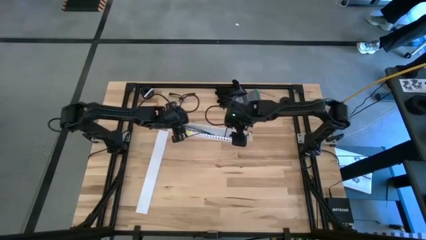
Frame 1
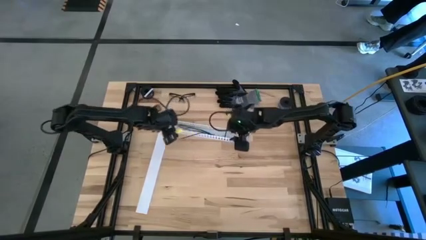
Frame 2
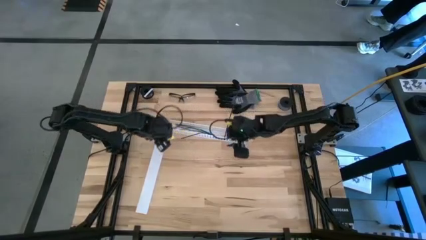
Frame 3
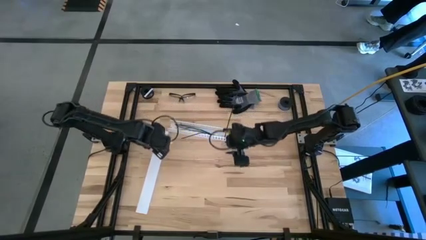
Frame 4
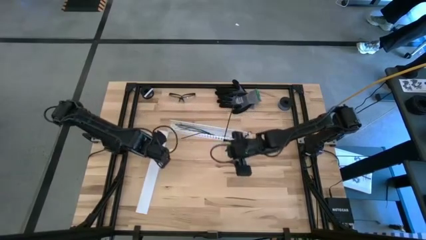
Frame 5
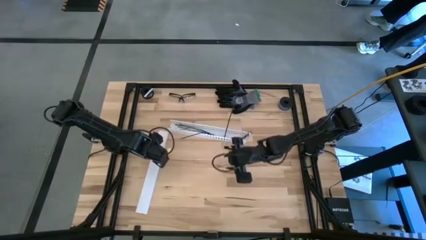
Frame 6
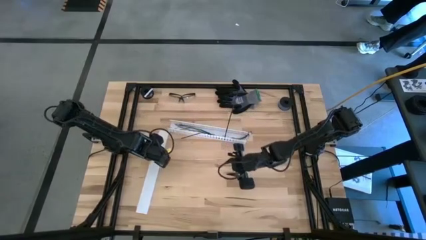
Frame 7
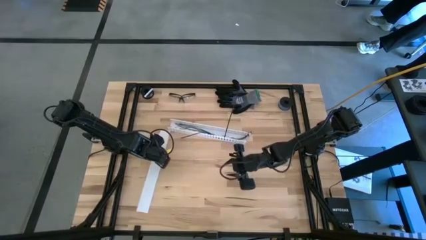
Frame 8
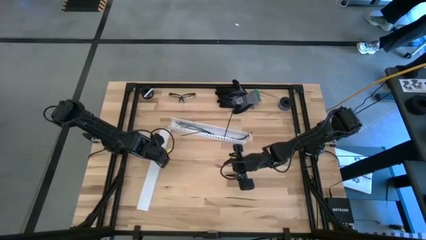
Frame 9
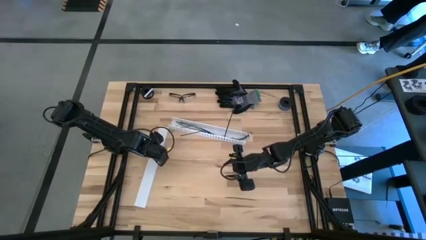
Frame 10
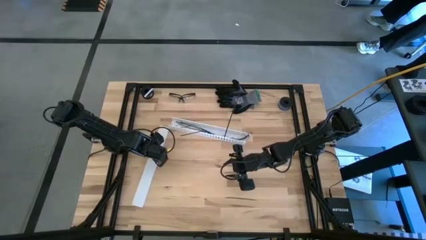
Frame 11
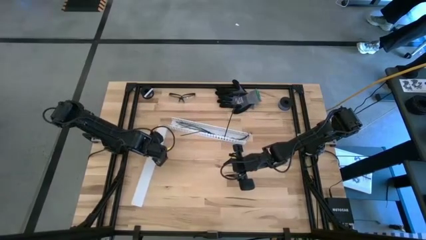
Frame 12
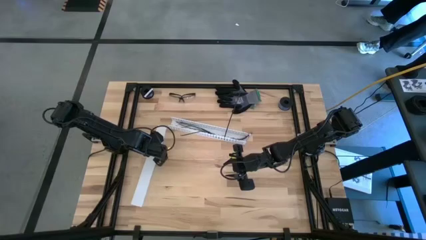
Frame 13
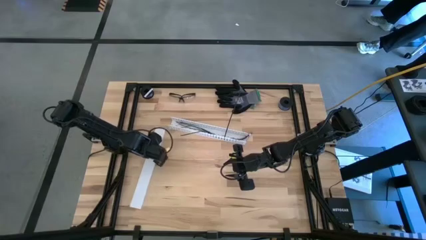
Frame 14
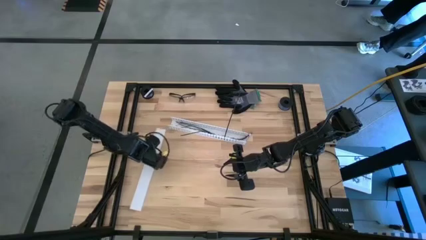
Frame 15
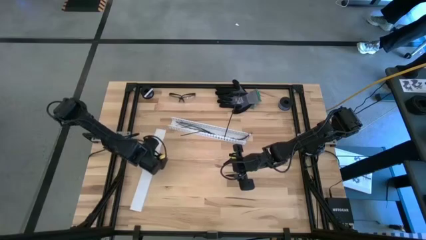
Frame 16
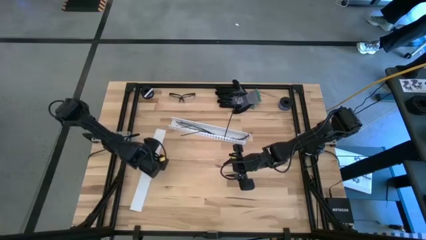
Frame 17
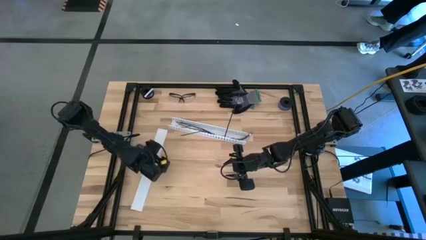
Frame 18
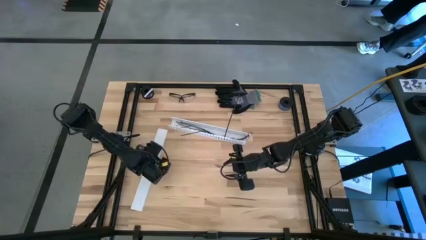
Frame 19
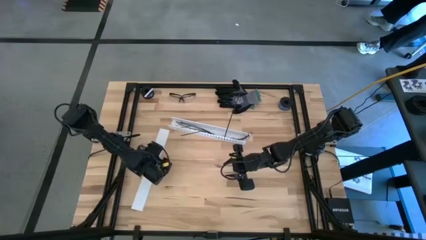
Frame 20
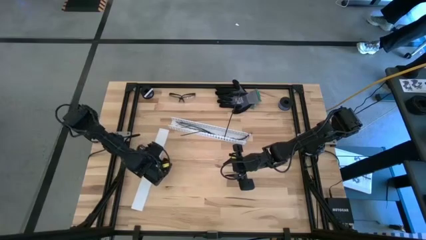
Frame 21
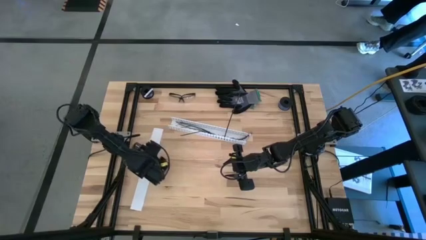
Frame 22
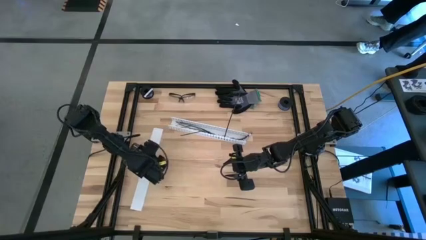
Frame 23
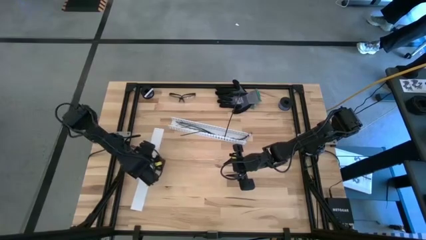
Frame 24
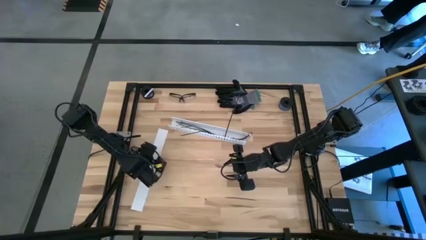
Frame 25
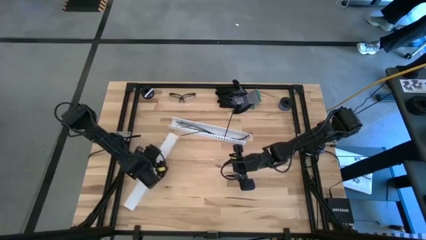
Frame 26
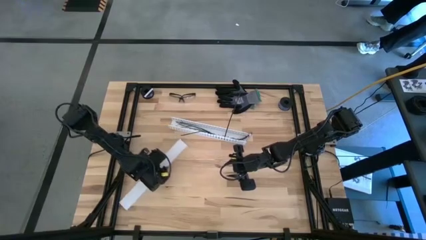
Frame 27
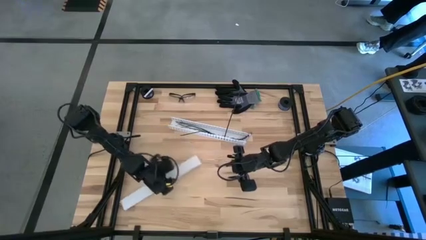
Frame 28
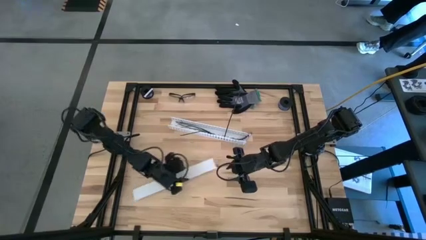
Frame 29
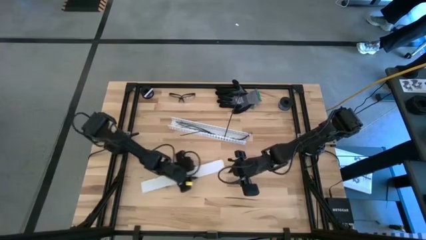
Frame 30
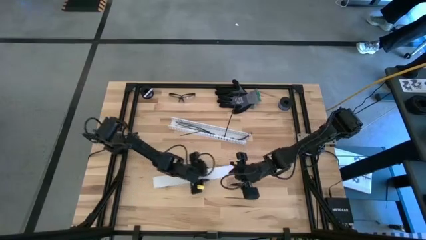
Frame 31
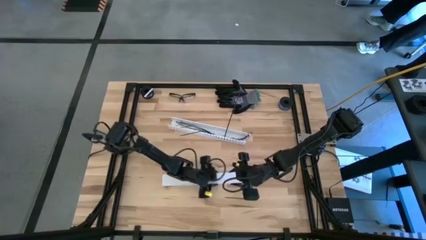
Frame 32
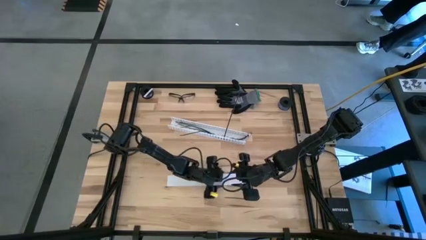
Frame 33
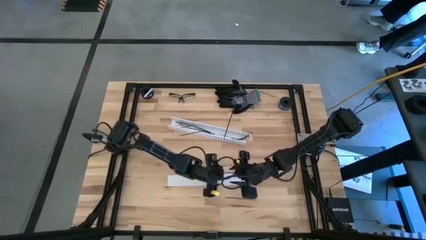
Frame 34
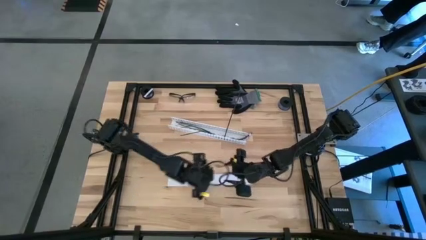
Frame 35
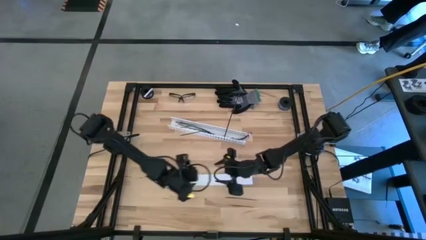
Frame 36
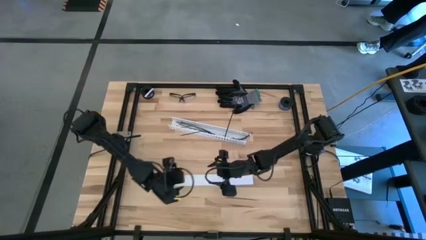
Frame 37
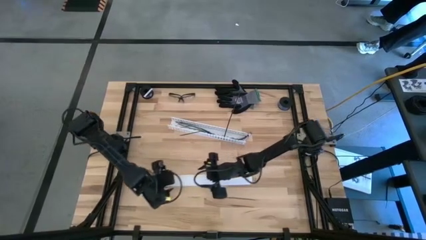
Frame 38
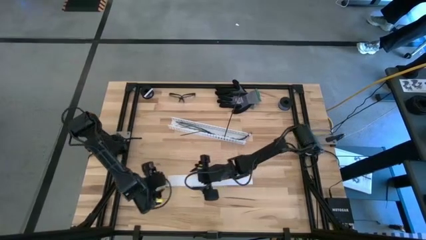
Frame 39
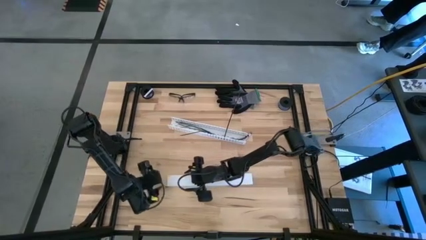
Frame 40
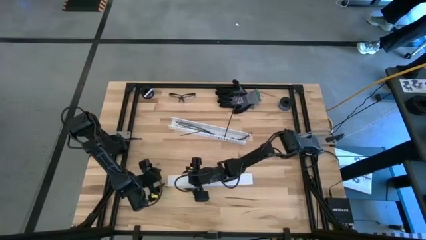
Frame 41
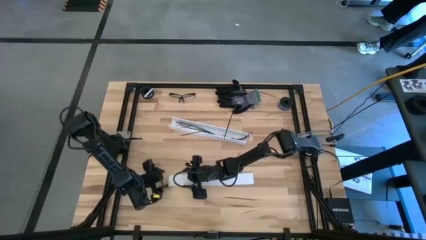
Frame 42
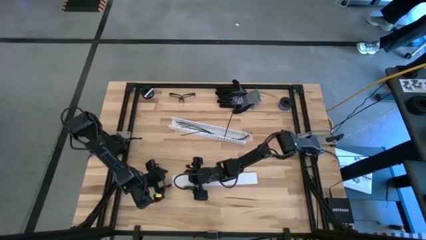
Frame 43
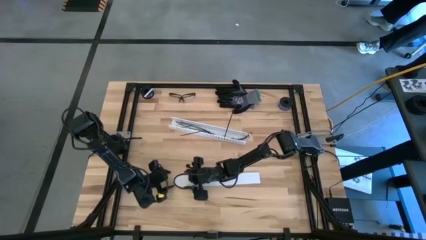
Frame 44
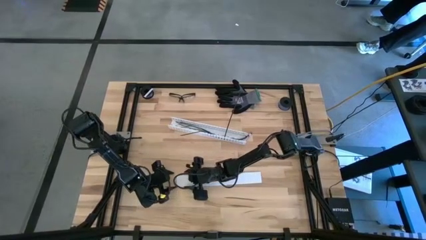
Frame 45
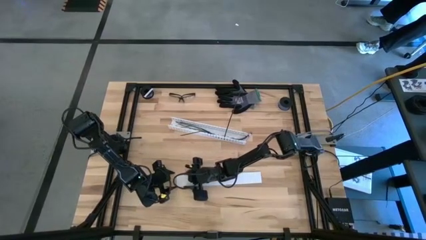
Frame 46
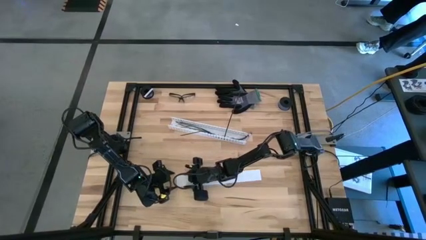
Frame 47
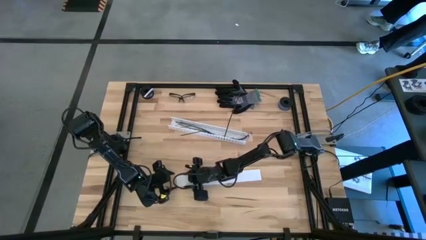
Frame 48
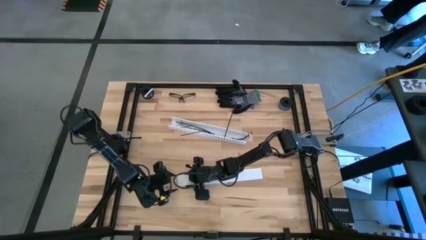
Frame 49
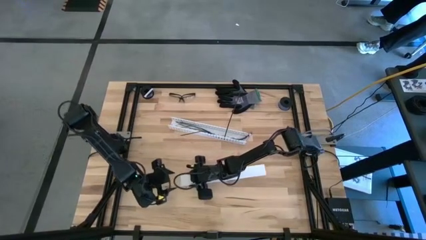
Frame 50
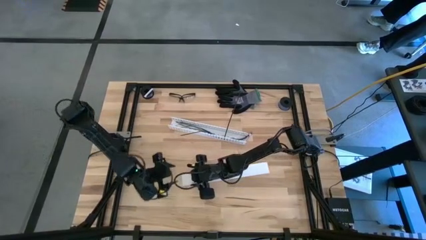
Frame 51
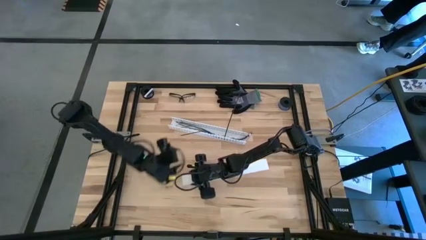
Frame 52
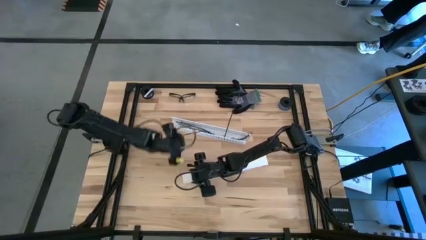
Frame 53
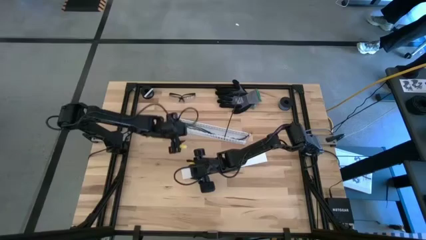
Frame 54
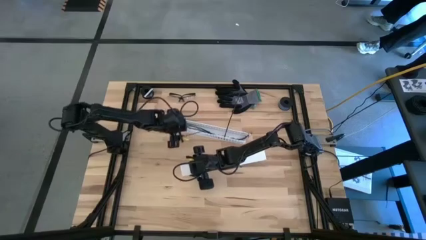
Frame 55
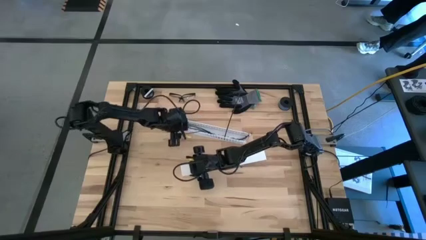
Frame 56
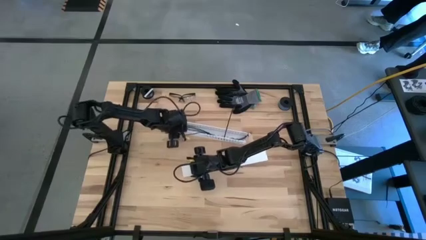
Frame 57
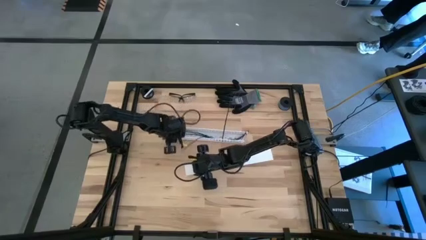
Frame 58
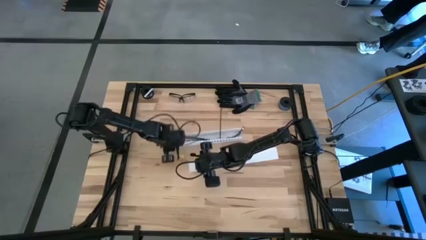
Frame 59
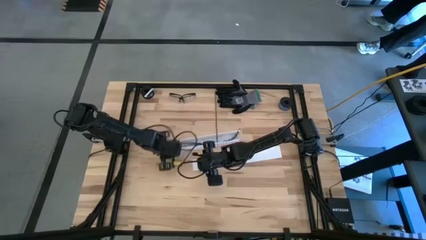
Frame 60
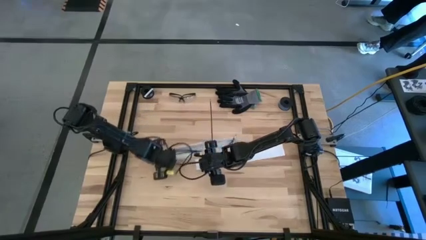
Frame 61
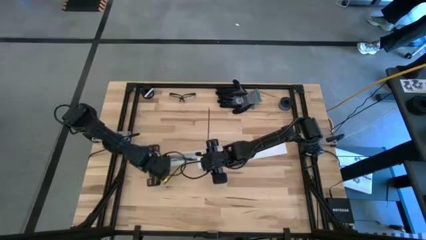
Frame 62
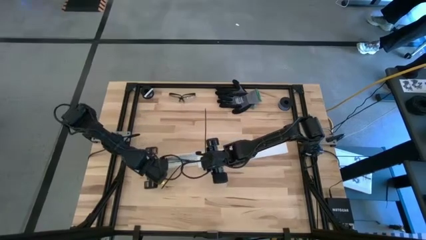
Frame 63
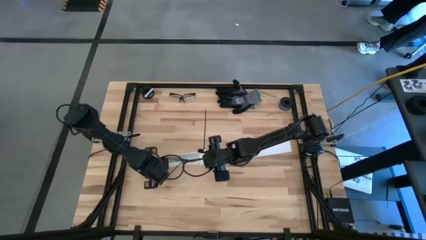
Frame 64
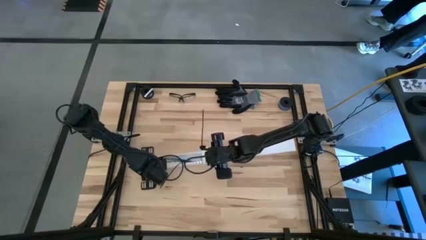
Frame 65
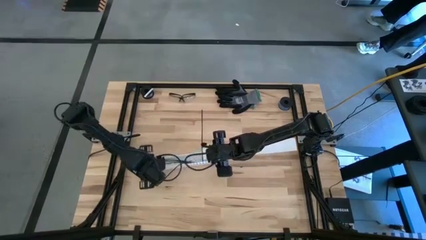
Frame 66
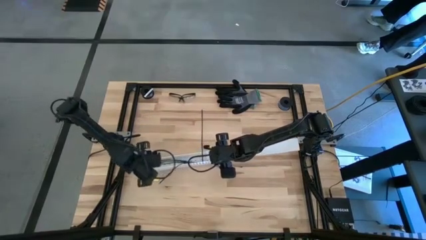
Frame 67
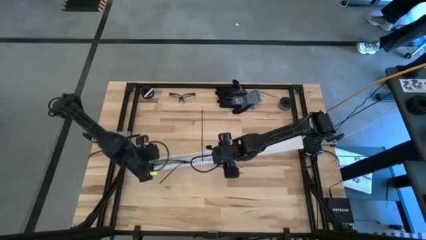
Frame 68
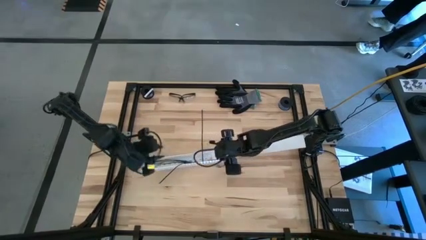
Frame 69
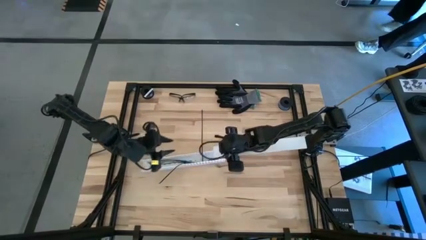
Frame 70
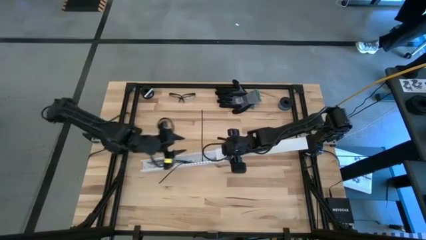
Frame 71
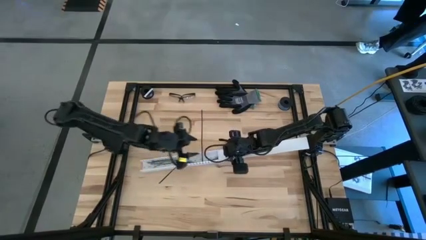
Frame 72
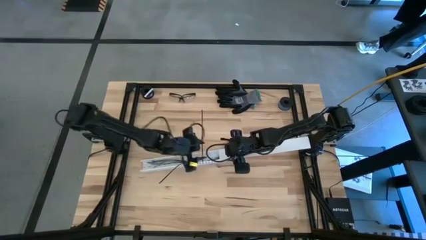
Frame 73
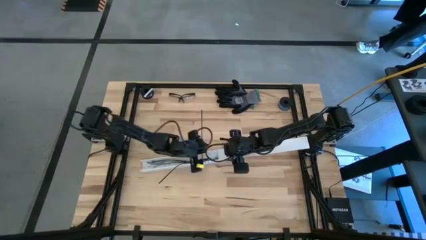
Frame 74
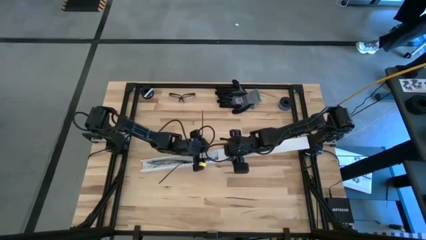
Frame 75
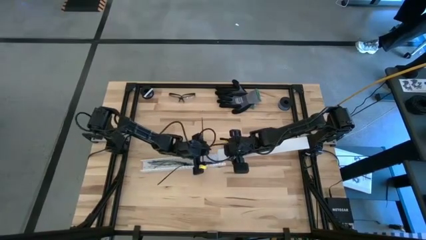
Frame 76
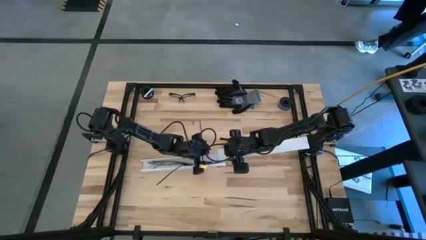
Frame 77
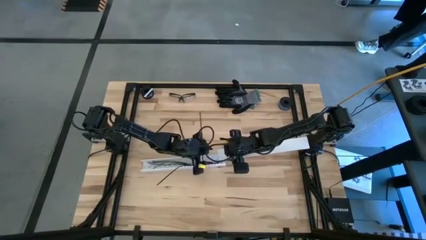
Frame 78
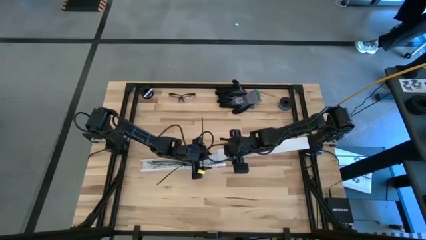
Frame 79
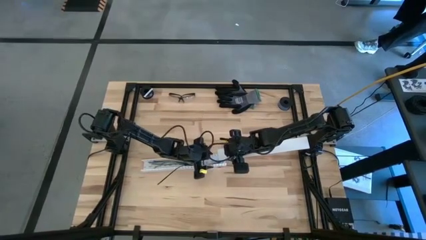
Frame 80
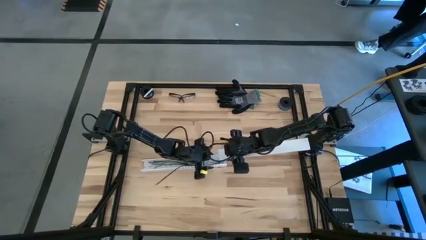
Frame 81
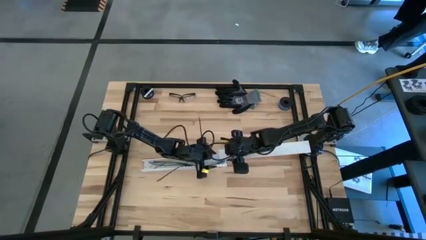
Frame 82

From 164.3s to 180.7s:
Task: Ziptie cables
Close the white cable duct

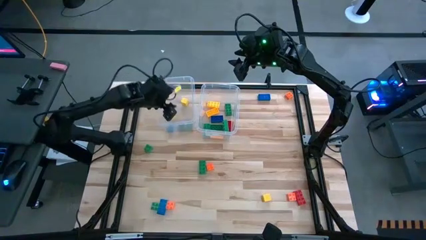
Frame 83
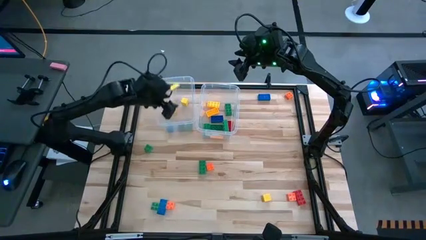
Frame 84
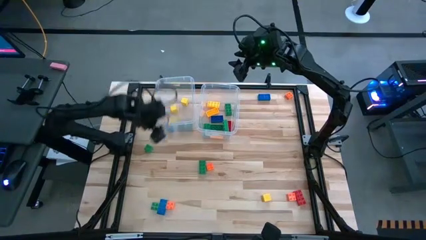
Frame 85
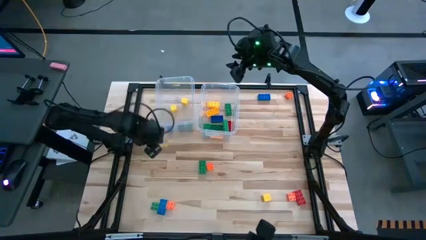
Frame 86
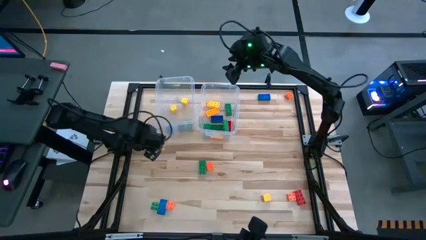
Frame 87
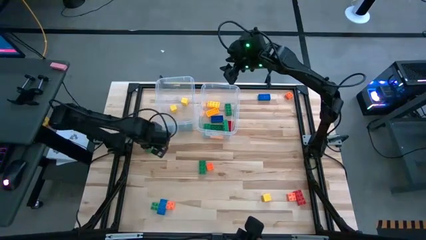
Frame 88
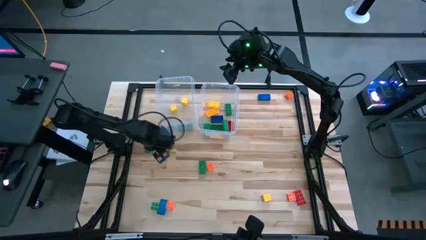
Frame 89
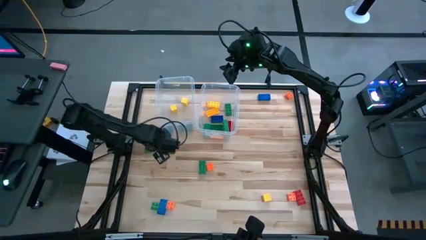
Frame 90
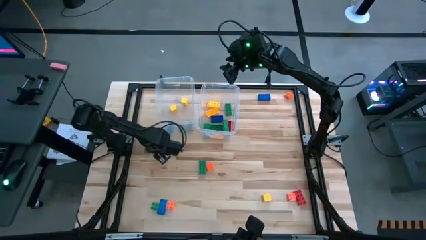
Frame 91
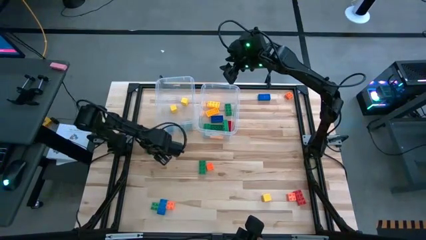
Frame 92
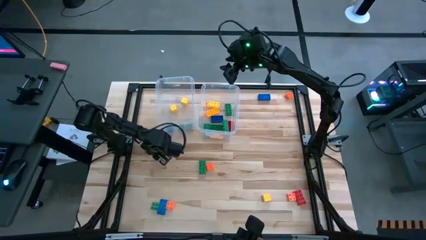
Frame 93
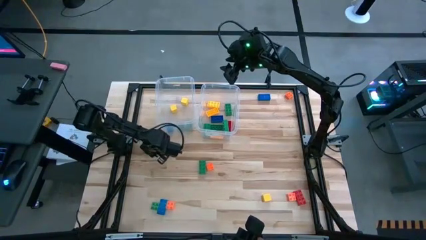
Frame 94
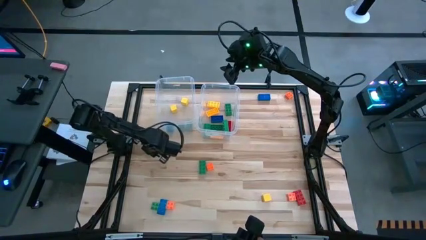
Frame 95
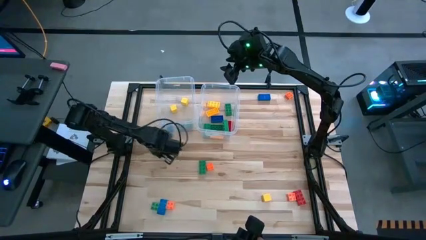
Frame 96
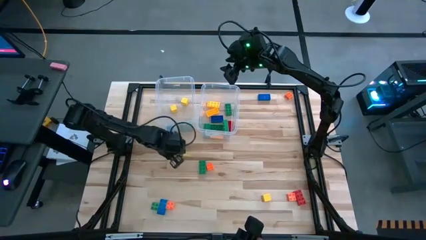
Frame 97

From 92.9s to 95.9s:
Task: Sort blocks by size
Put the green small game piece into the left transparent bin
